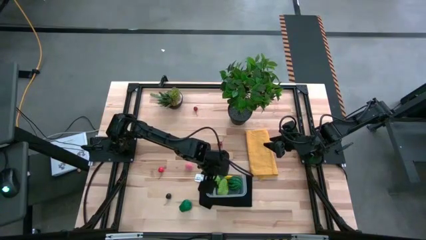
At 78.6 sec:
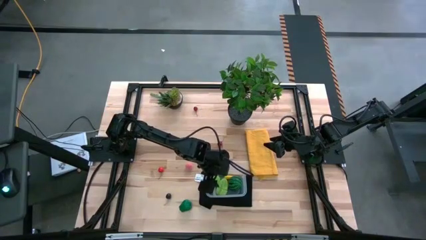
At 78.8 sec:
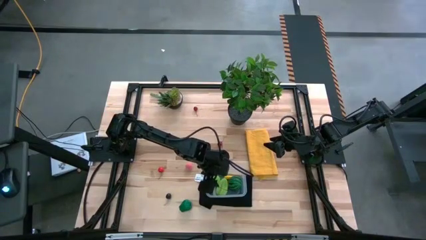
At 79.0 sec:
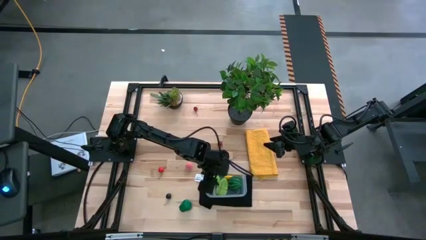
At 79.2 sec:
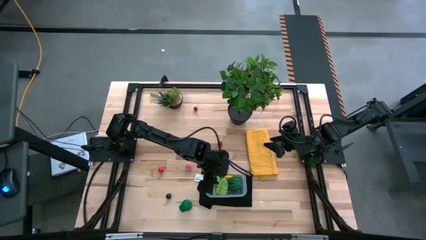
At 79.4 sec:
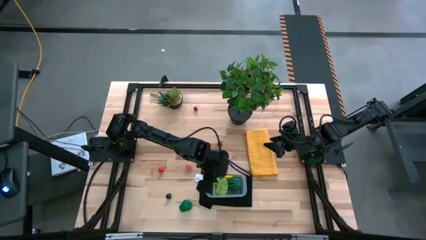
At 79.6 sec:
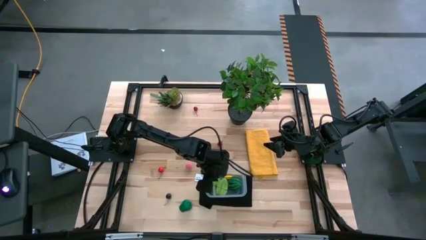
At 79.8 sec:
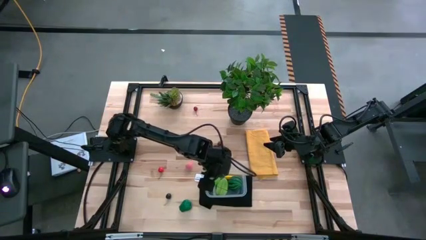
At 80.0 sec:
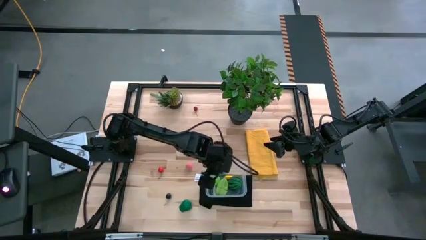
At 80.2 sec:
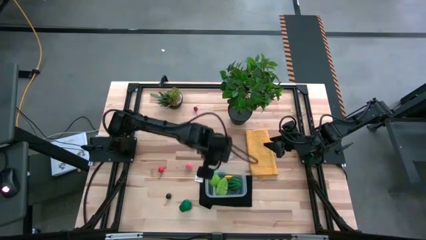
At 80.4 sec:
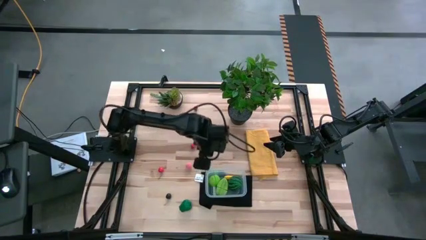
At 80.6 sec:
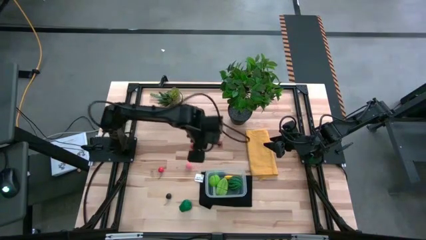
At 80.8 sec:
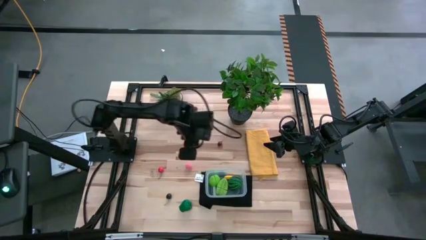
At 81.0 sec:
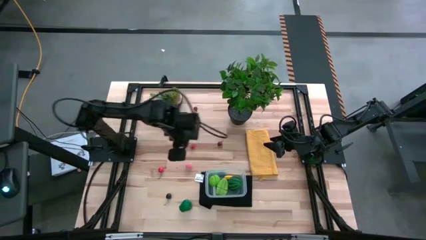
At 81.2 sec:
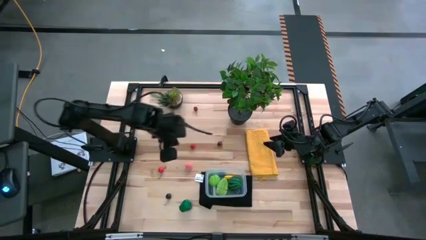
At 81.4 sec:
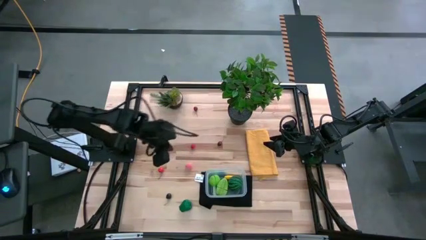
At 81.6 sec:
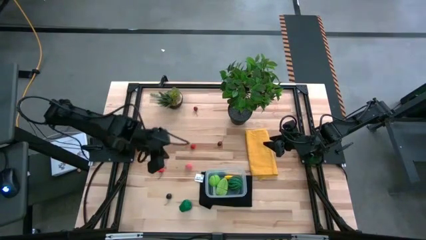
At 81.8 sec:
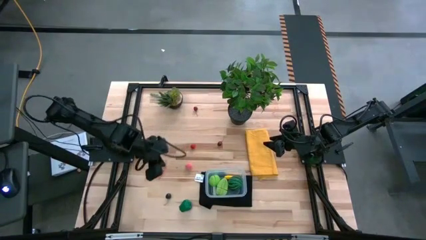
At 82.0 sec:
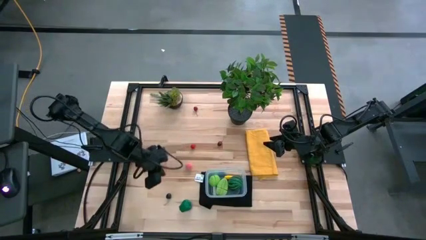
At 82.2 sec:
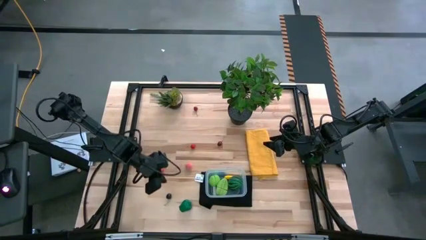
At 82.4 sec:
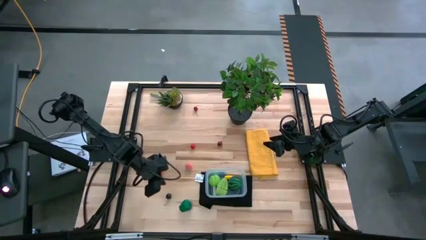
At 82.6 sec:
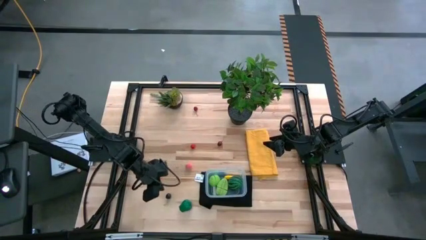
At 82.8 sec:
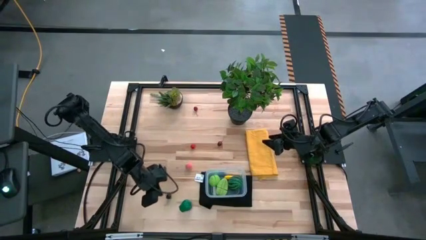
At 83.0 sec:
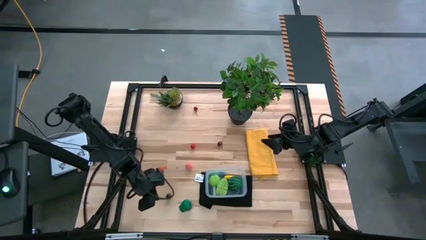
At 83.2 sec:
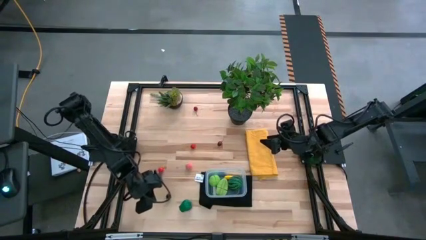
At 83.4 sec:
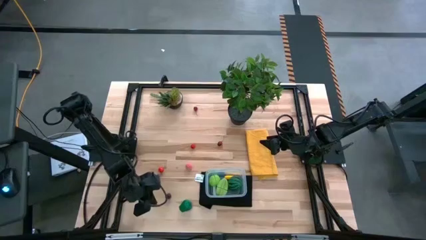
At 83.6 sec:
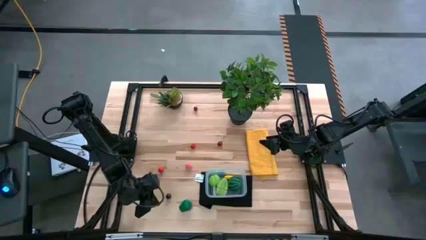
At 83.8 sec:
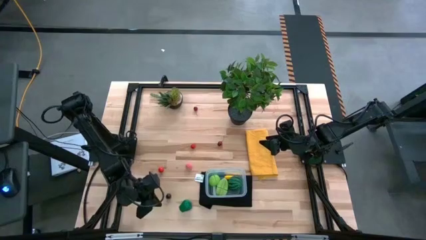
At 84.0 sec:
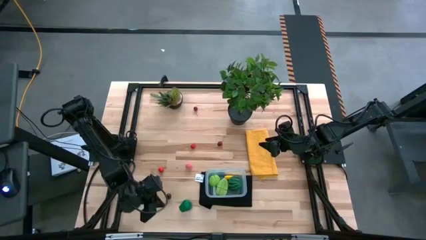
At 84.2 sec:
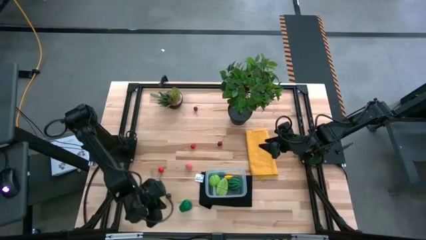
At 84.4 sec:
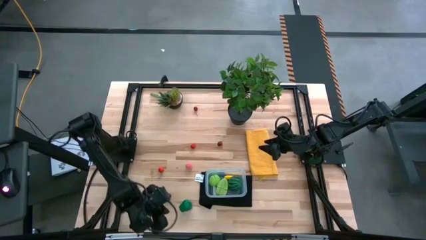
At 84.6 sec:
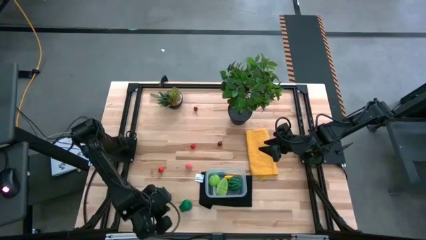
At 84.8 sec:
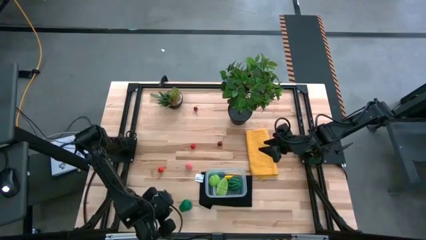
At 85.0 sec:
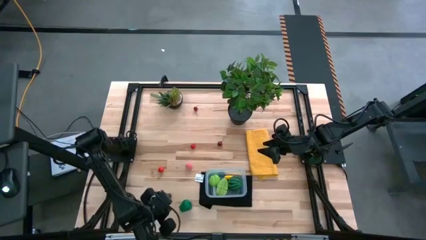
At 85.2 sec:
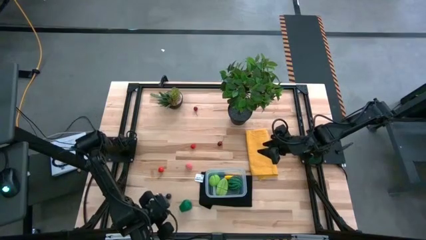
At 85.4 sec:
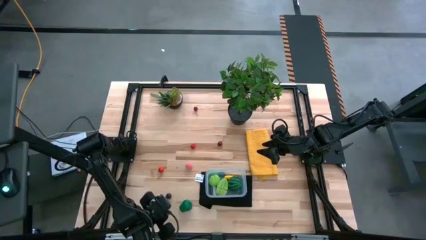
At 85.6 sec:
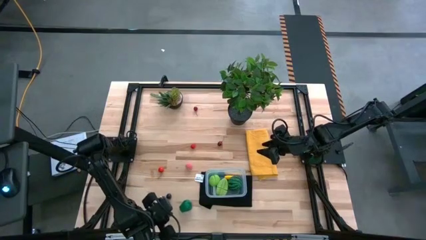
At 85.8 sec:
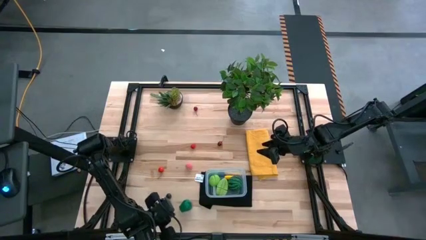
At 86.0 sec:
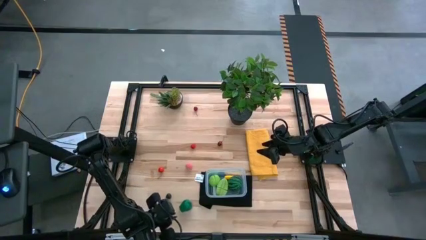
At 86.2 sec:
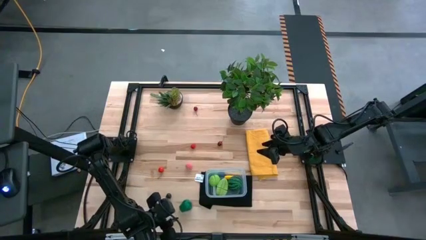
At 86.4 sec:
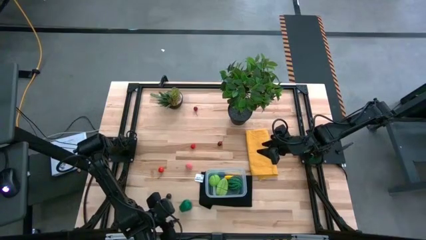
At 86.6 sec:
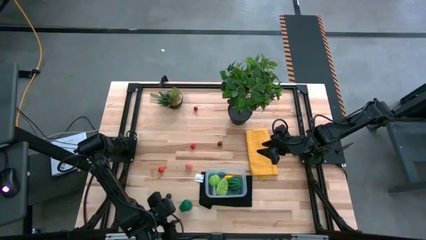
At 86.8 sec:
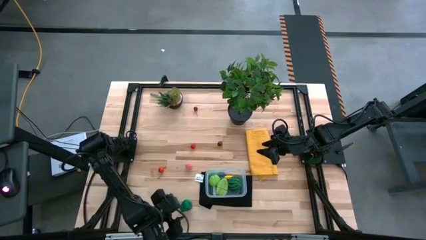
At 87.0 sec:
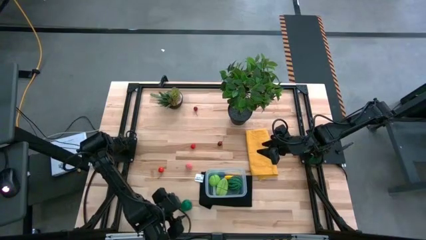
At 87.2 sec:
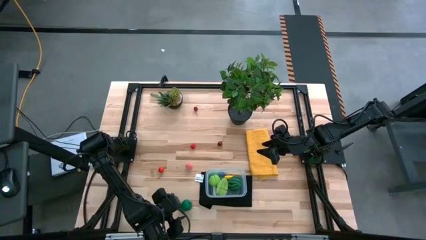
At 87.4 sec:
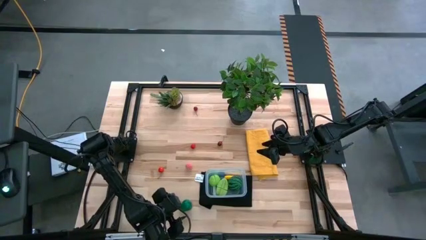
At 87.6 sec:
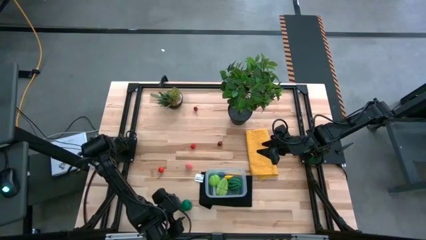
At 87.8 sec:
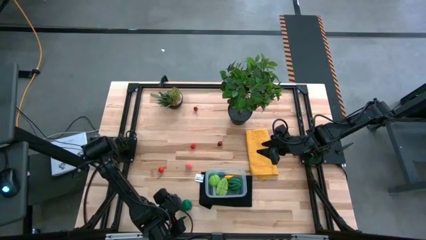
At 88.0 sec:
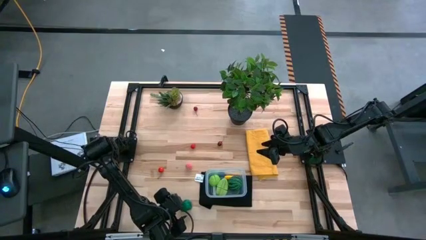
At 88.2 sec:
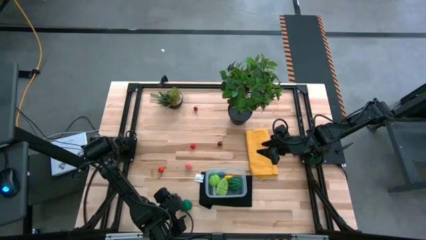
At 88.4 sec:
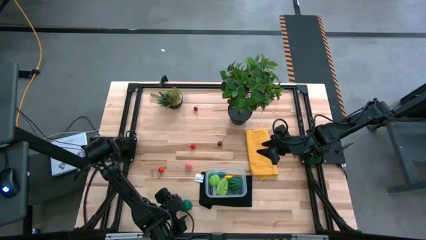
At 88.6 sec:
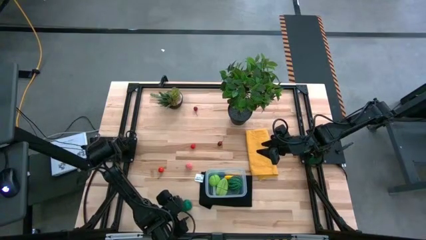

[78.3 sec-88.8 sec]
Task: Pick and placing Produce into tupperware
Put the bell pepper into the transparent bin

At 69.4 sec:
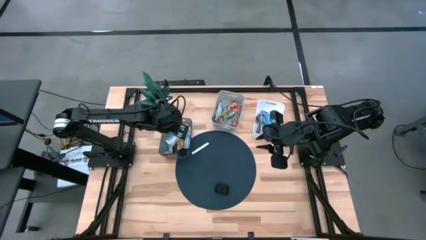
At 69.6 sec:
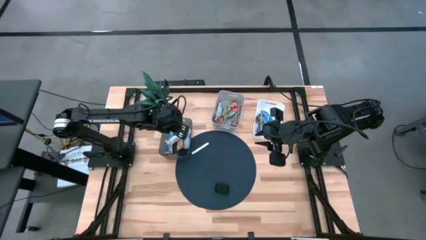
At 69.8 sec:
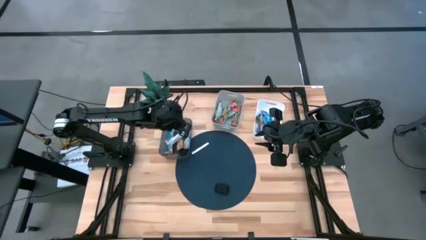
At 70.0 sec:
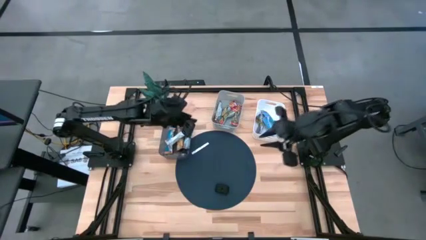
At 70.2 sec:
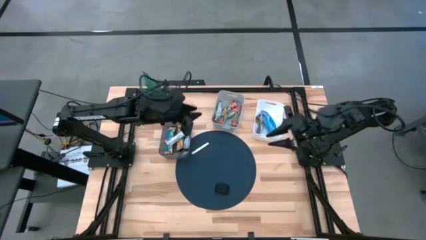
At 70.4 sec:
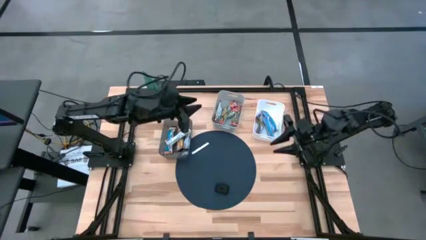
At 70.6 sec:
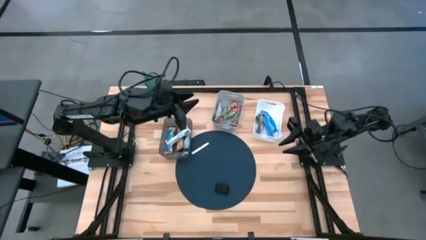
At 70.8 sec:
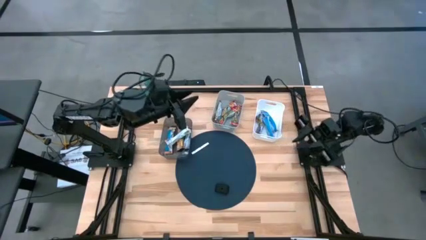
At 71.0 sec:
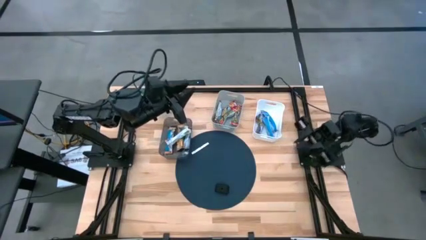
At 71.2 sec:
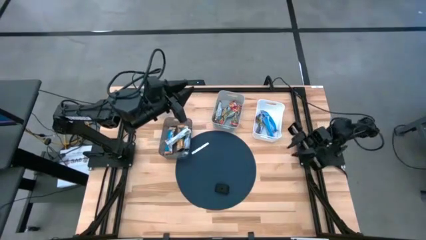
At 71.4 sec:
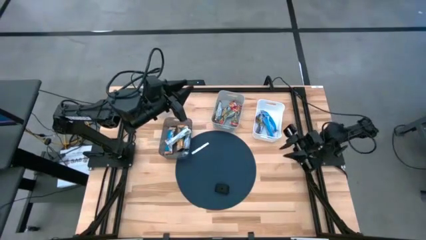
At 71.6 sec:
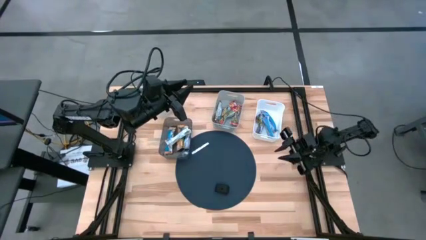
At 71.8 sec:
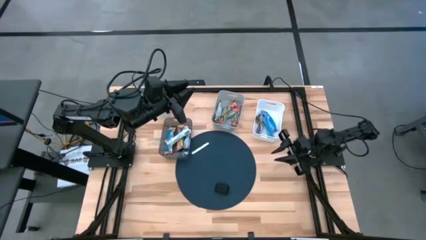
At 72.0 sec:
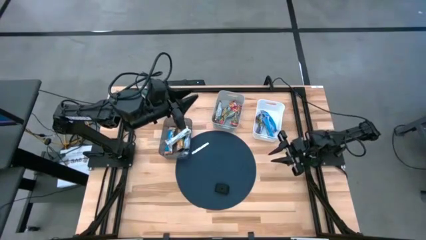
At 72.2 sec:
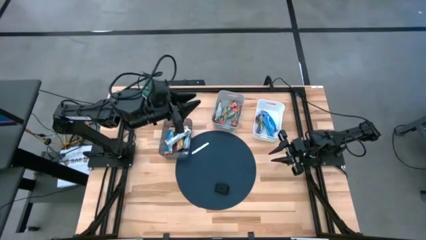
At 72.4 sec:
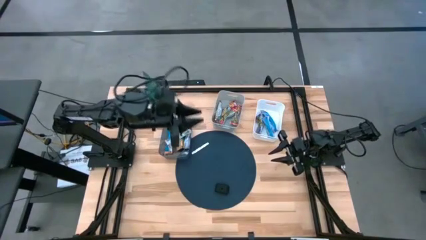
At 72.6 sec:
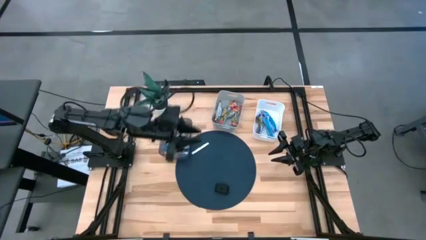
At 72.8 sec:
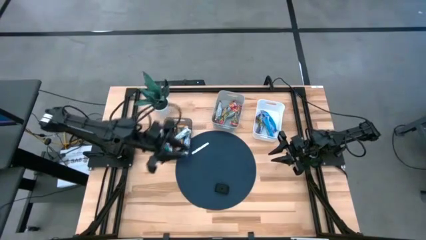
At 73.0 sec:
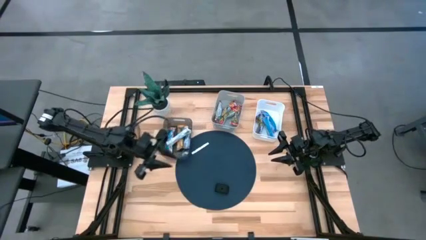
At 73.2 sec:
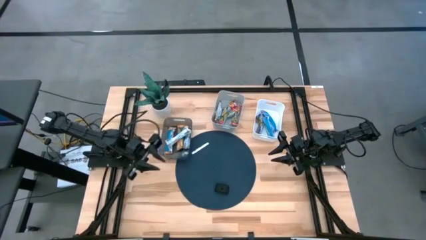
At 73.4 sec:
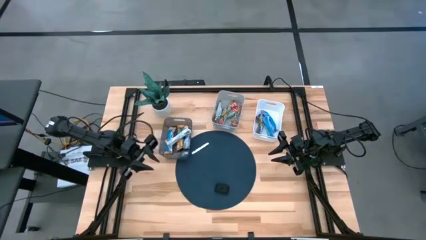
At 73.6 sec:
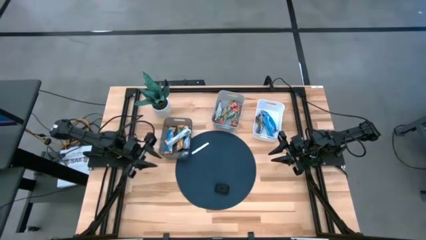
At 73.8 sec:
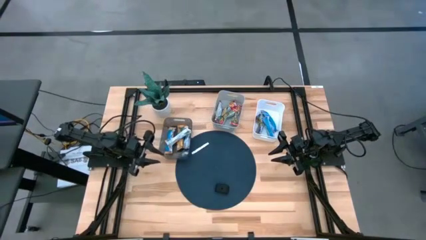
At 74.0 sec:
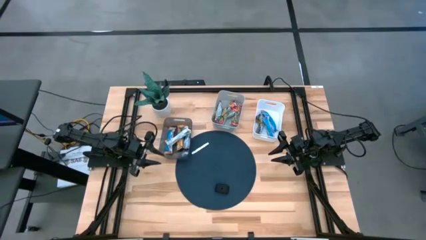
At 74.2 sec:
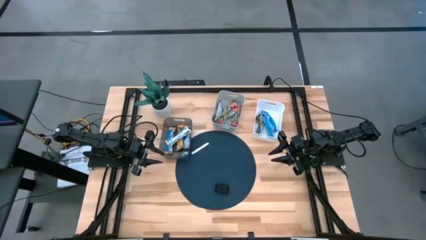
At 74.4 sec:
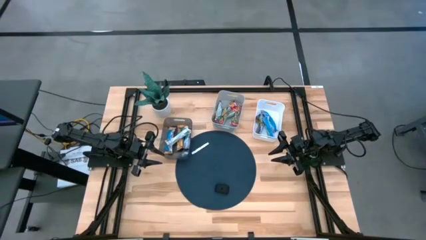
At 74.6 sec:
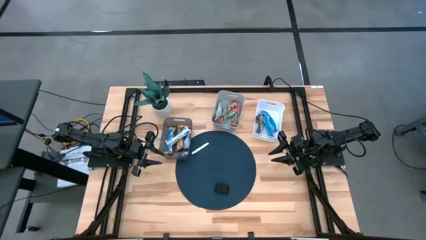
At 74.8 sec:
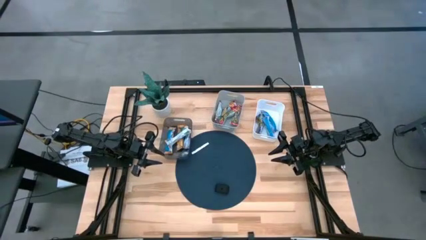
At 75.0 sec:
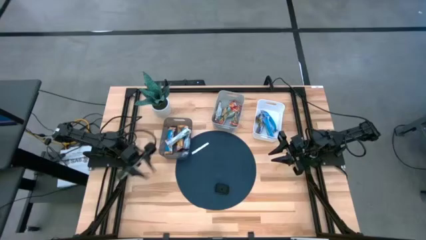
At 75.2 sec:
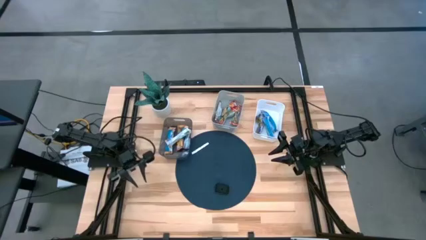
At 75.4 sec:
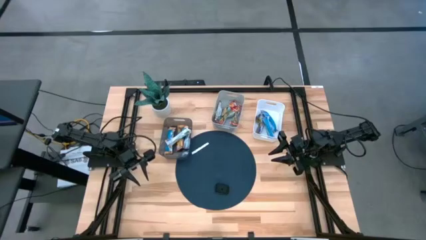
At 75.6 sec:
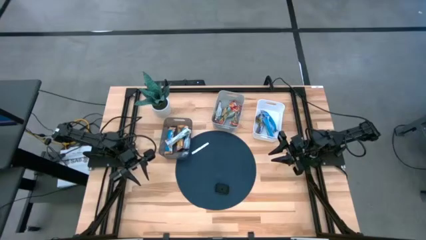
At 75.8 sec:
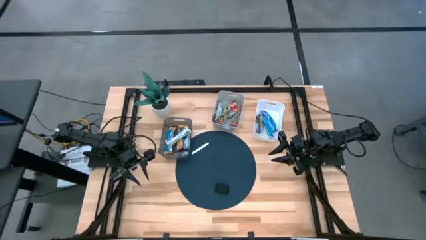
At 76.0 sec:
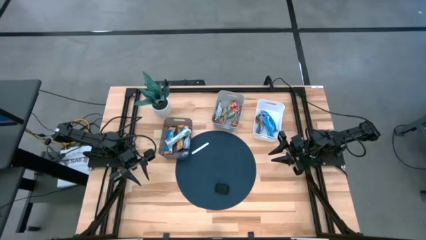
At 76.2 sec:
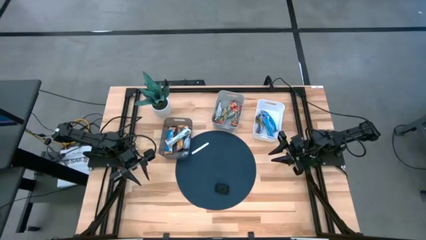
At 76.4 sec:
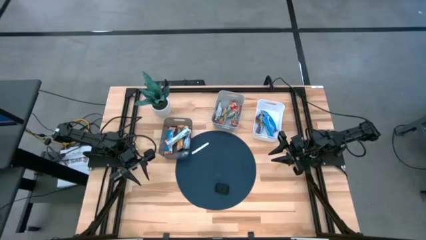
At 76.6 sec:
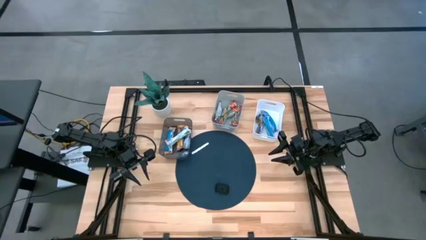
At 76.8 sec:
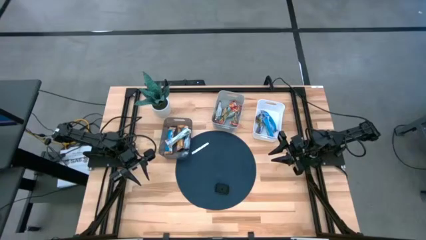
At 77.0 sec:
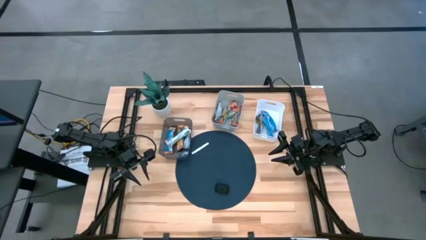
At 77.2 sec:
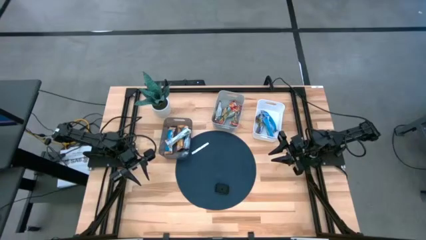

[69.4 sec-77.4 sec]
Task: Pick and place Granola Bars by type
Return to Home Position
